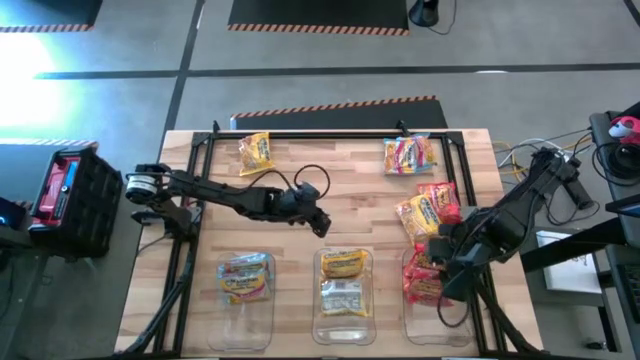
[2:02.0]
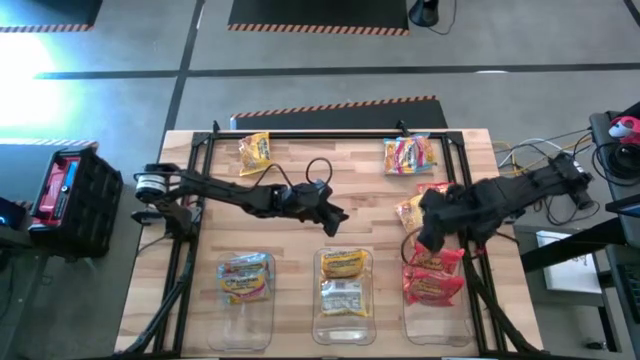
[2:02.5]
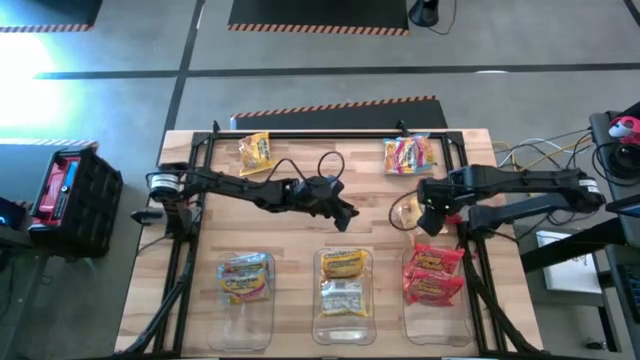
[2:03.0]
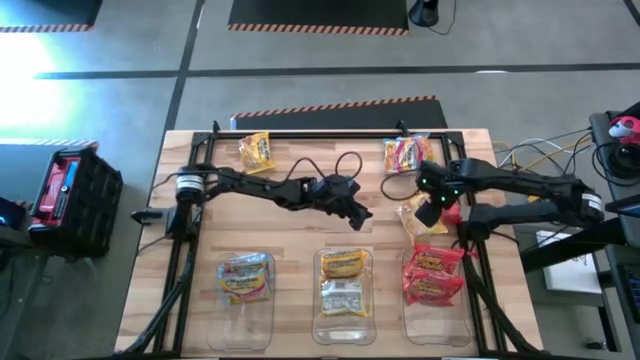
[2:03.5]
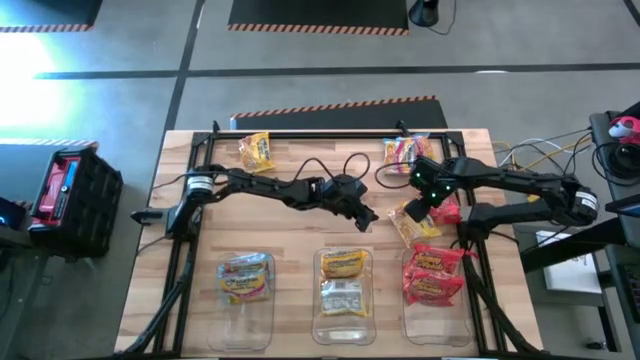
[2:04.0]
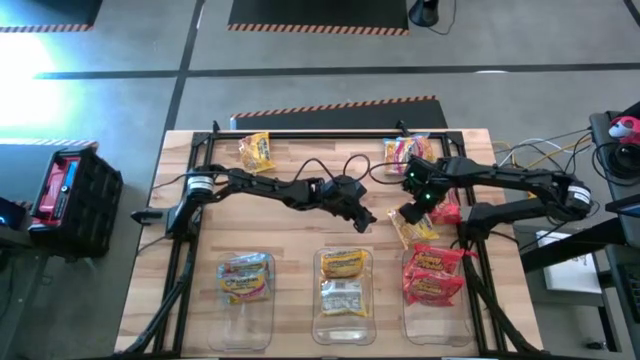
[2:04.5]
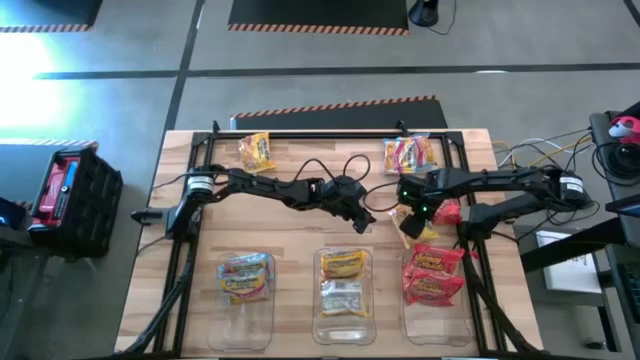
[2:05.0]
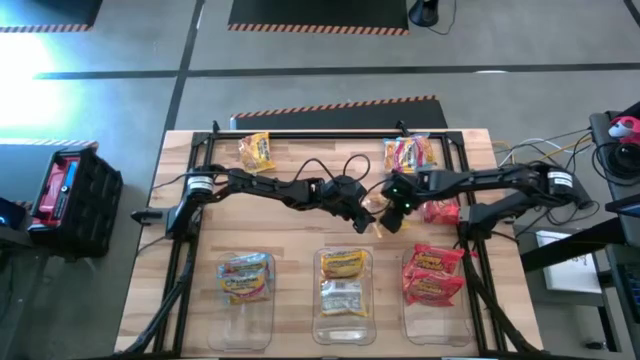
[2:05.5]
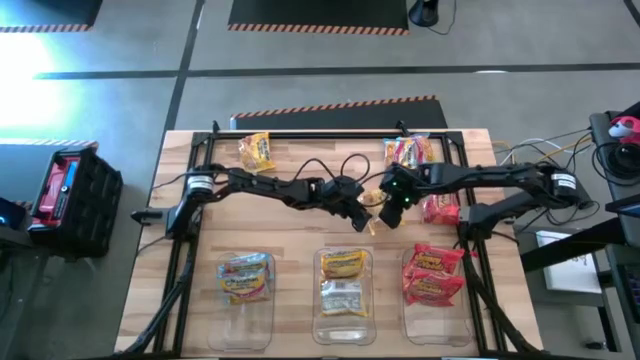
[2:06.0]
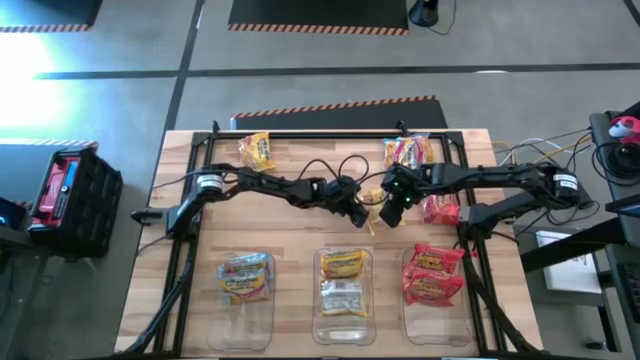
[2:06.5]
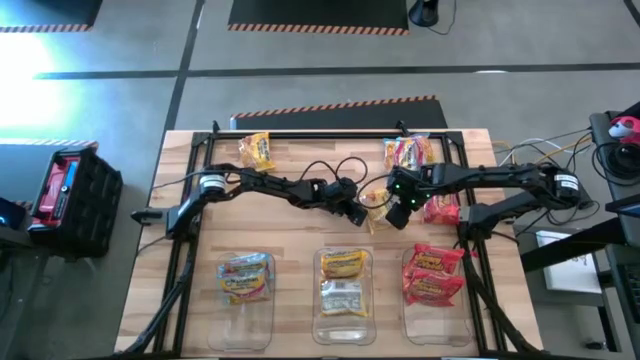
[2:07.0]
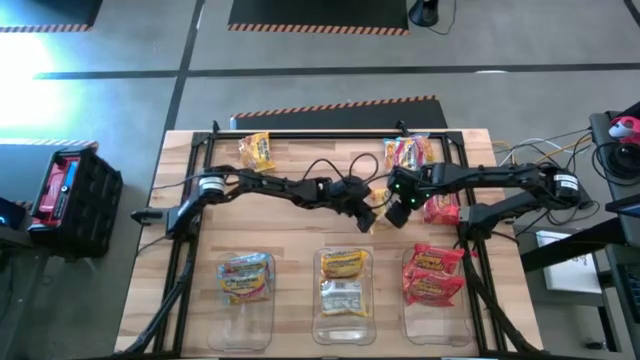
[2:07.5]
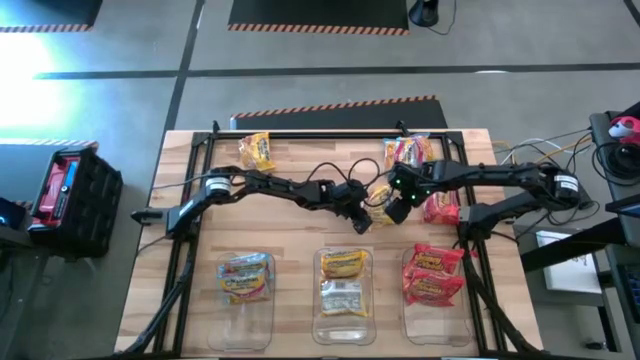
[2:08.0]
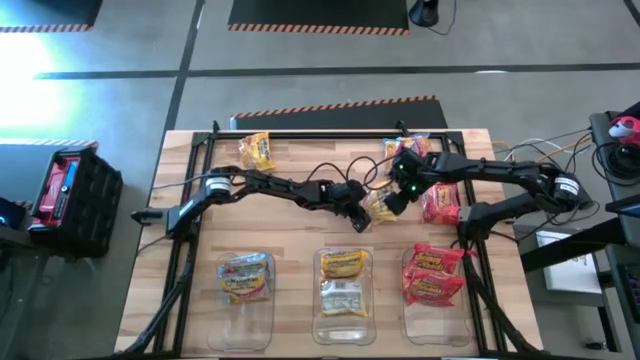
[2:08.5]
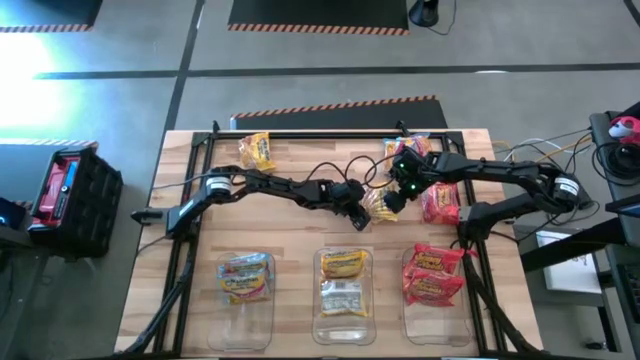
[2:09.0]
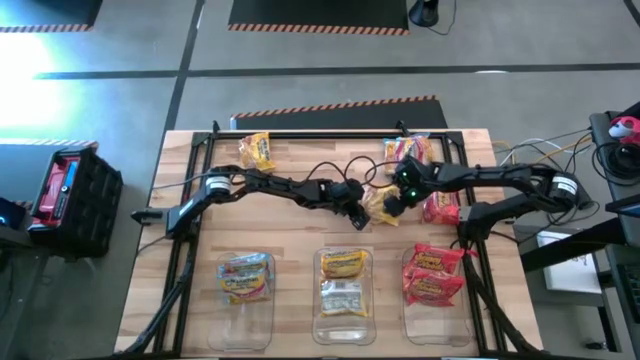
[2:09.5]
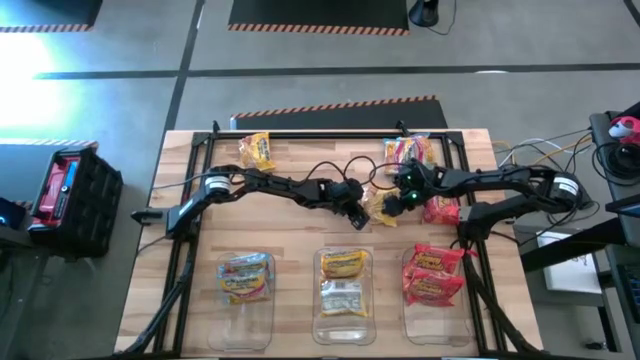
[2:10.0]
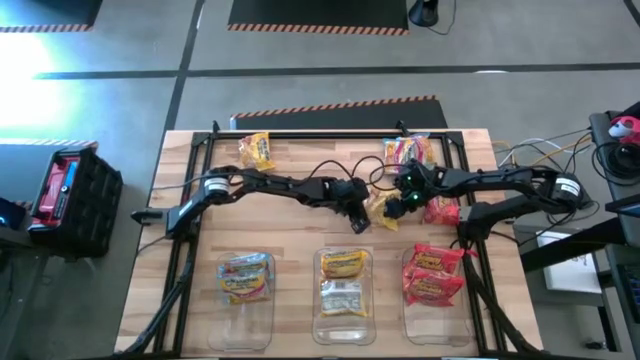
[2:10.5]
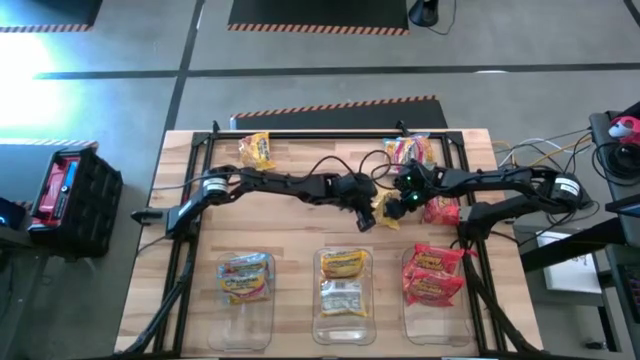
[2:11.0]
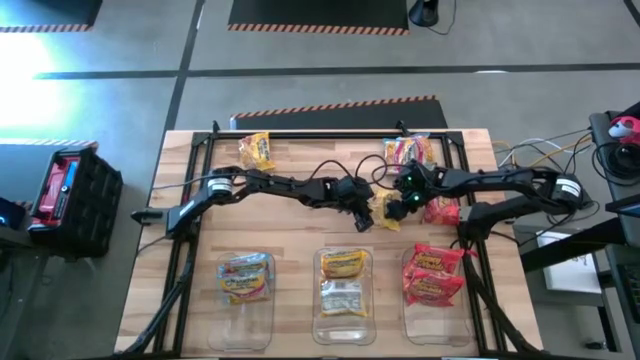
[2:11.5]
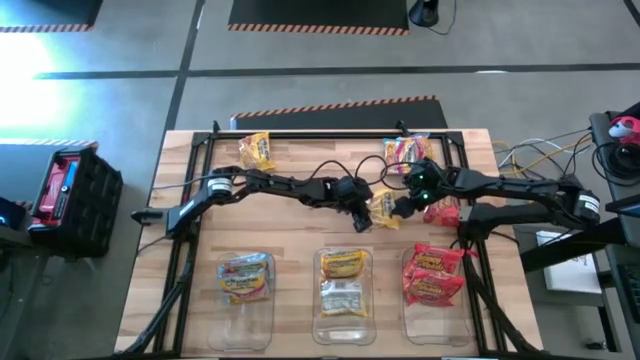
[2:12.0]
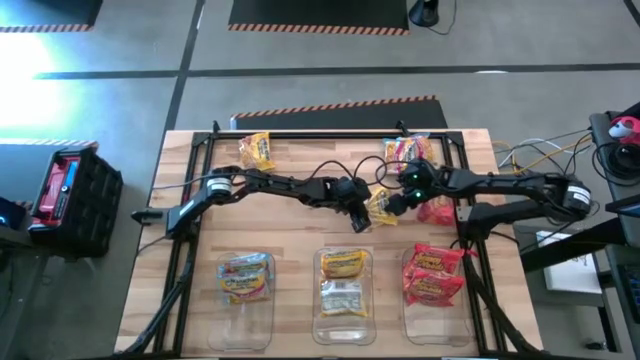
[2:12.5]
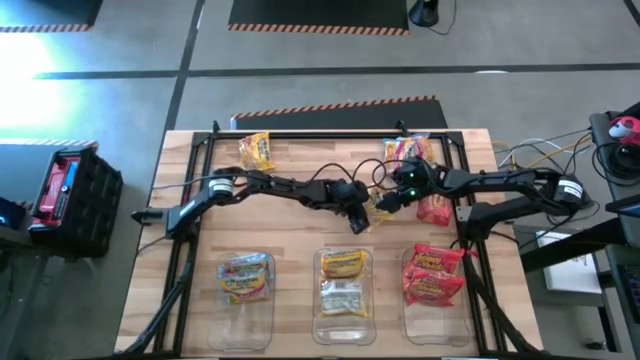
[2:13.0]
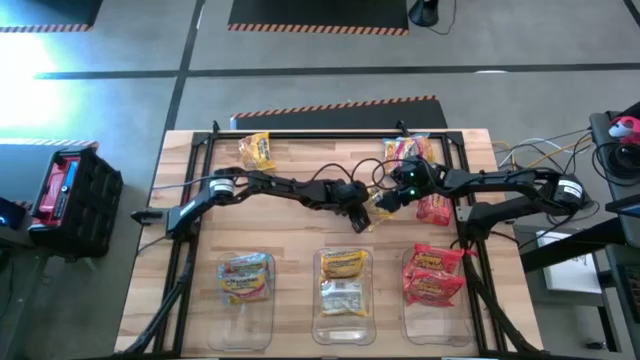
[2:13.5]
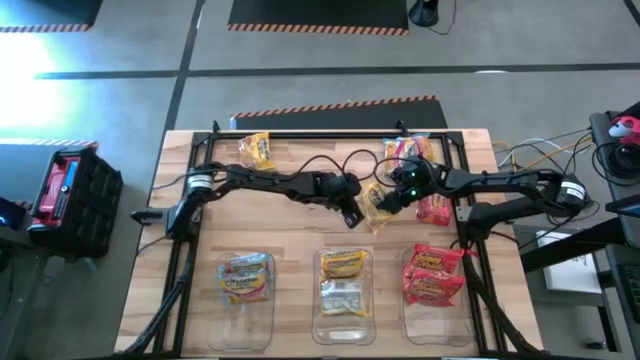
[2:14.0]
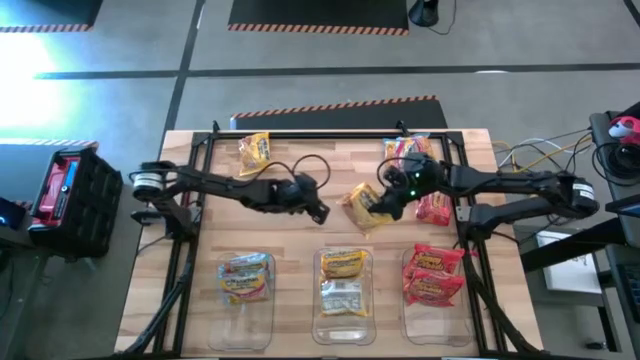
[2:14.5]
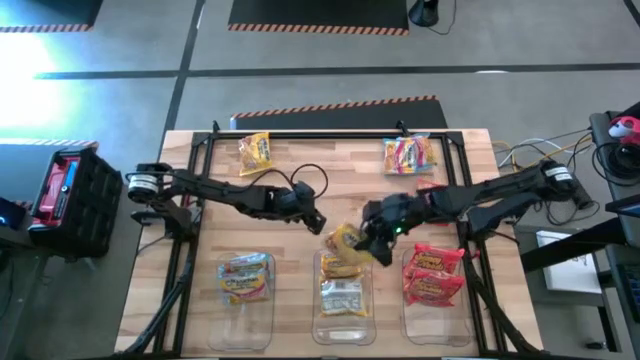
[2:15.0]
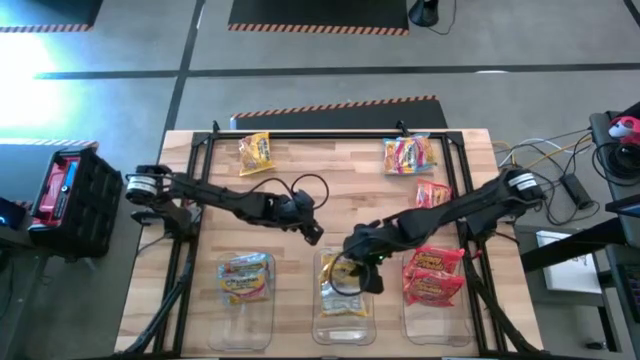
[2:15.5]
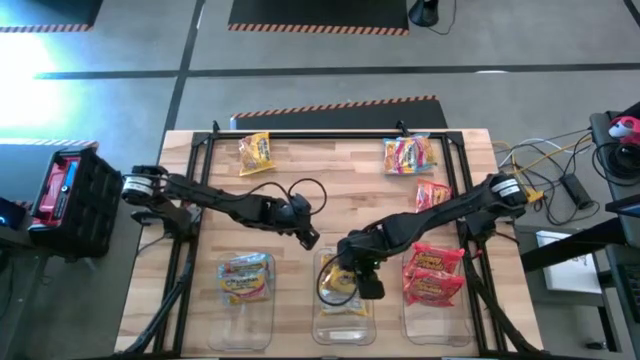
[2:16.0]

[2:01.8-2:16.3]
Task: Sort Maruchan noodles
Put the yellow noodle pack into the right transparent bin
